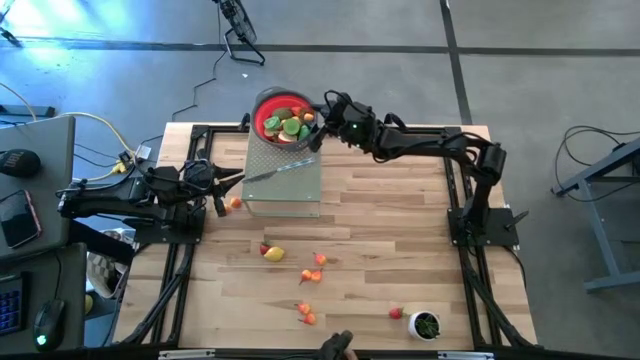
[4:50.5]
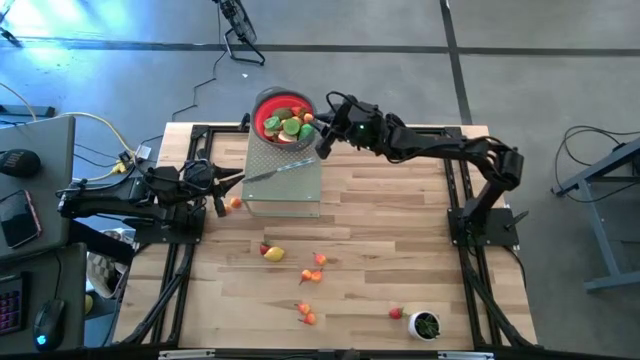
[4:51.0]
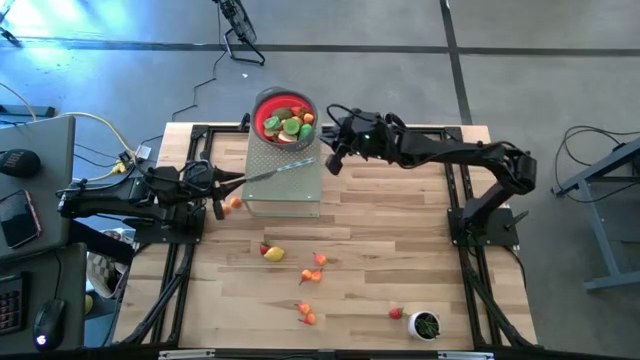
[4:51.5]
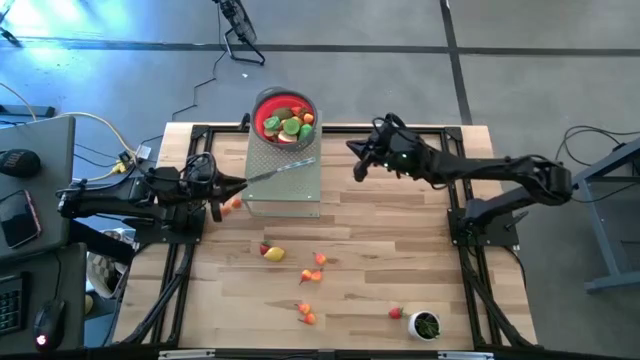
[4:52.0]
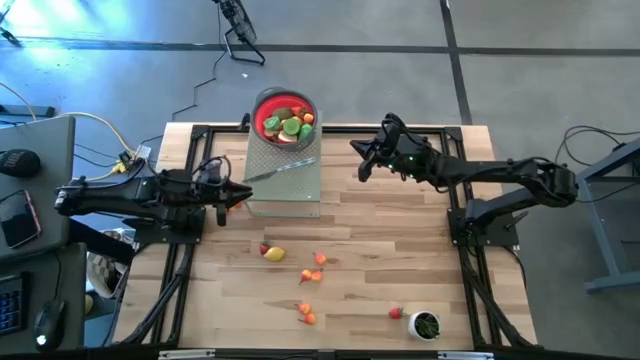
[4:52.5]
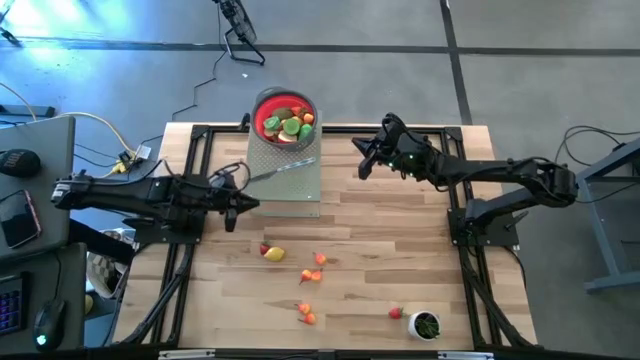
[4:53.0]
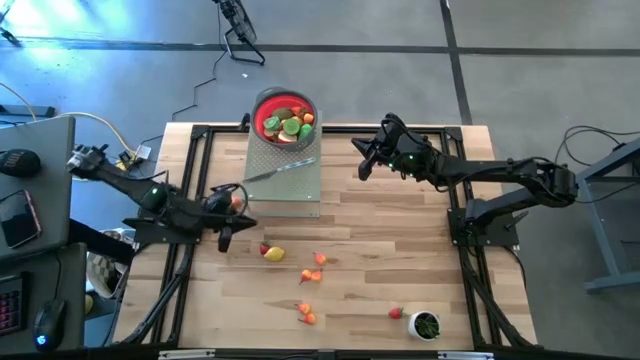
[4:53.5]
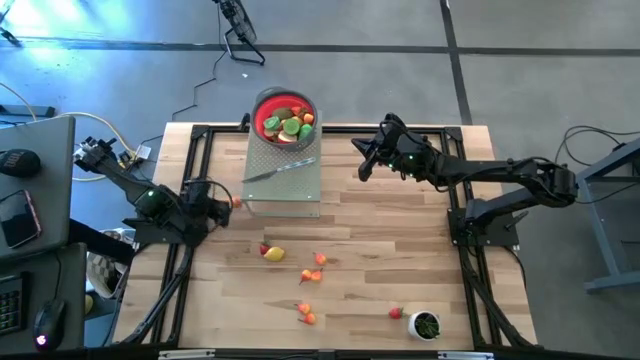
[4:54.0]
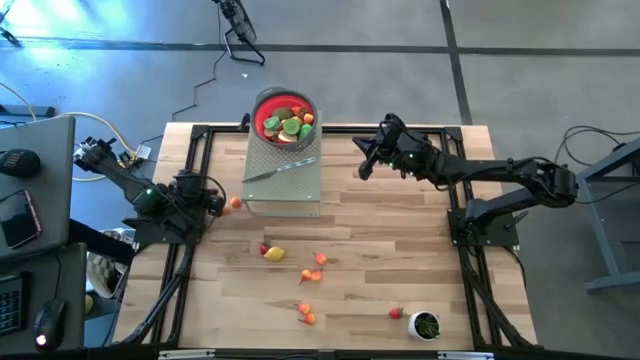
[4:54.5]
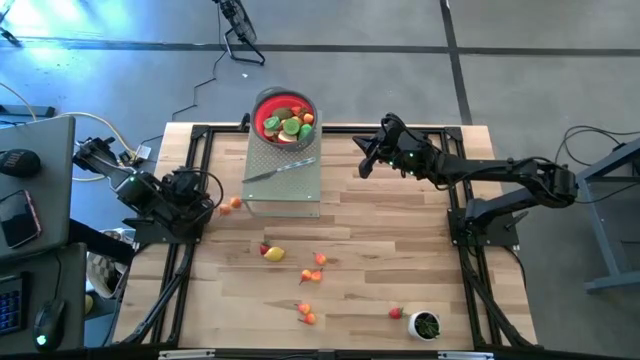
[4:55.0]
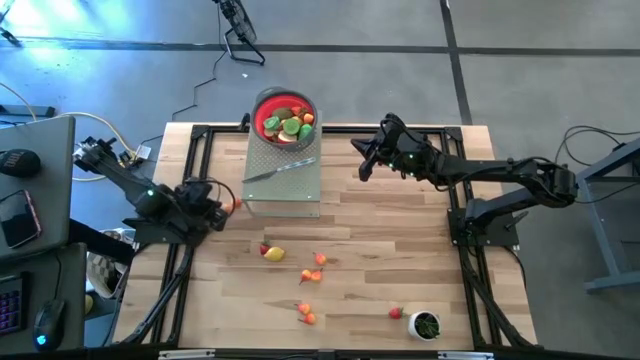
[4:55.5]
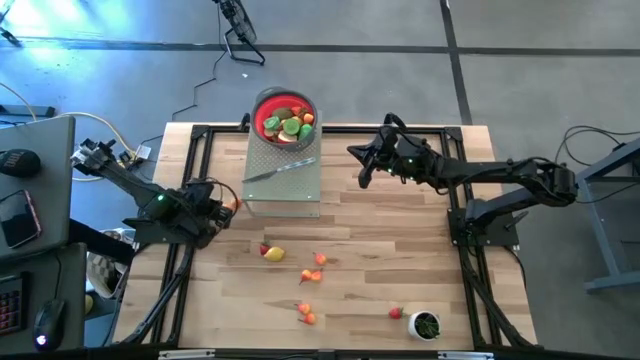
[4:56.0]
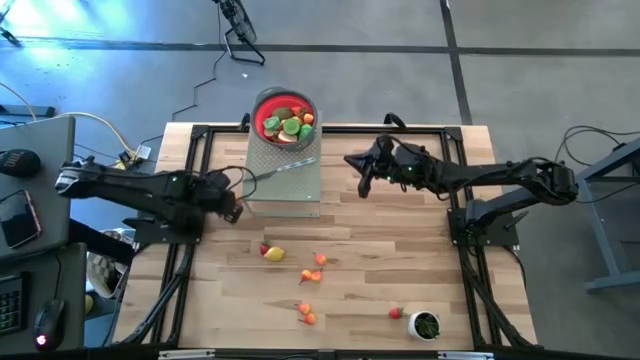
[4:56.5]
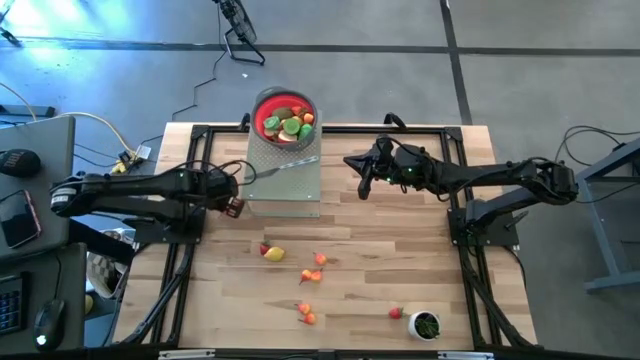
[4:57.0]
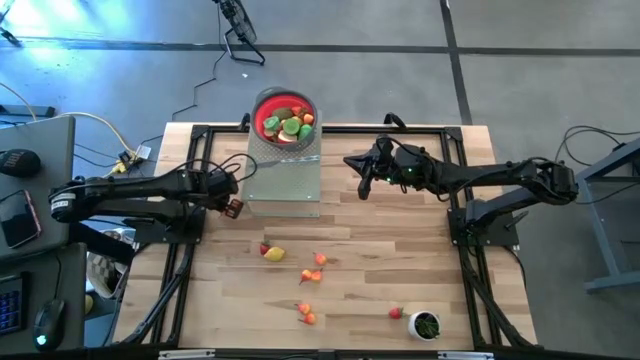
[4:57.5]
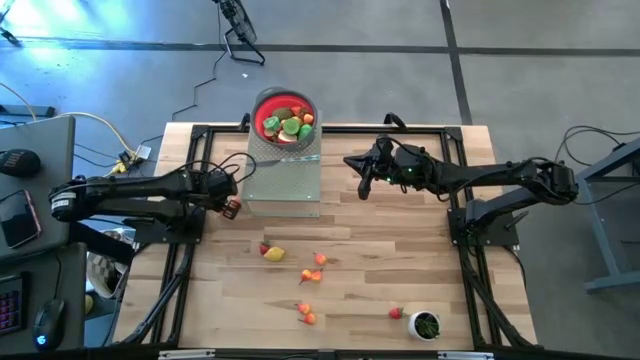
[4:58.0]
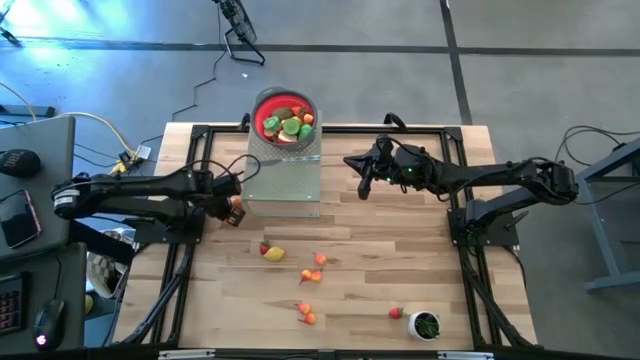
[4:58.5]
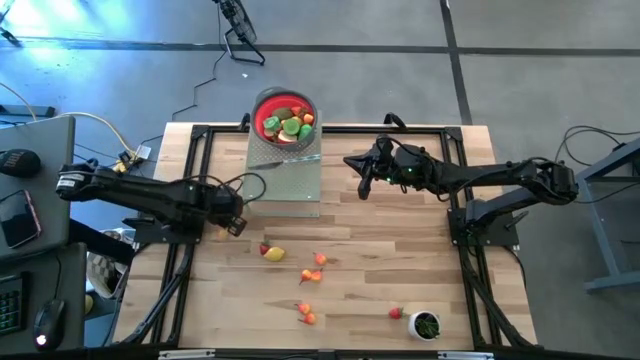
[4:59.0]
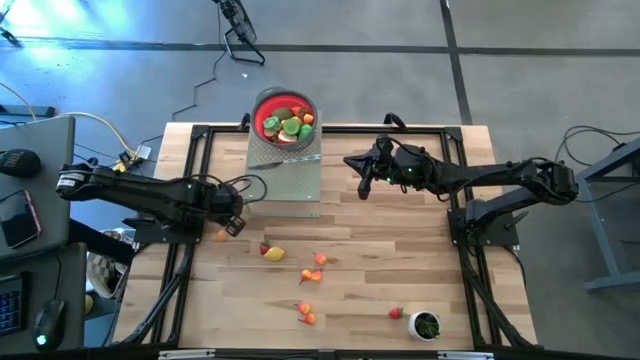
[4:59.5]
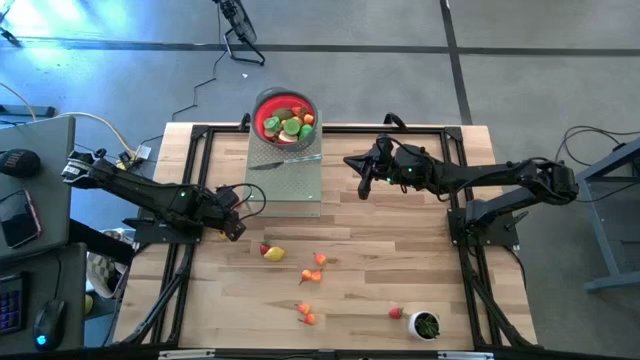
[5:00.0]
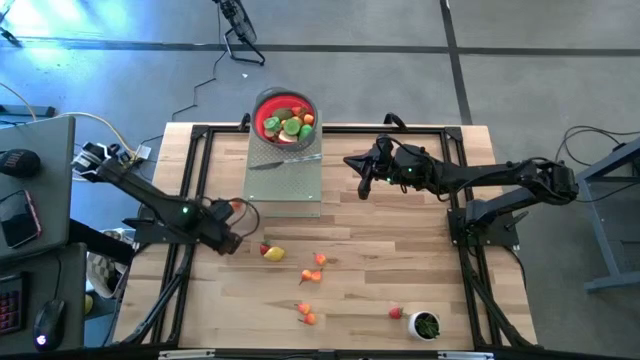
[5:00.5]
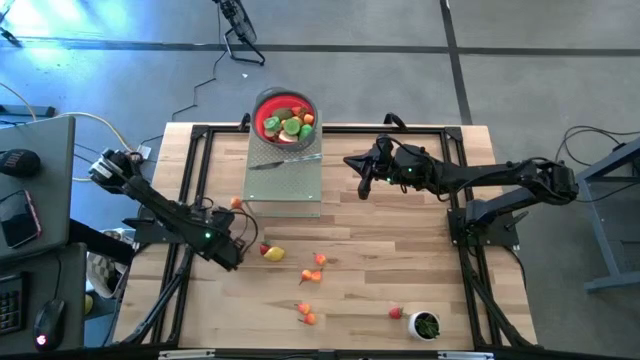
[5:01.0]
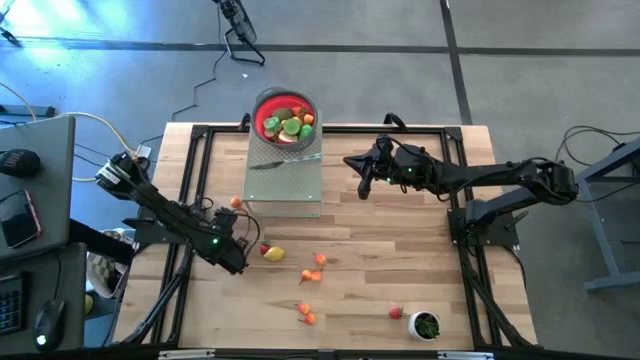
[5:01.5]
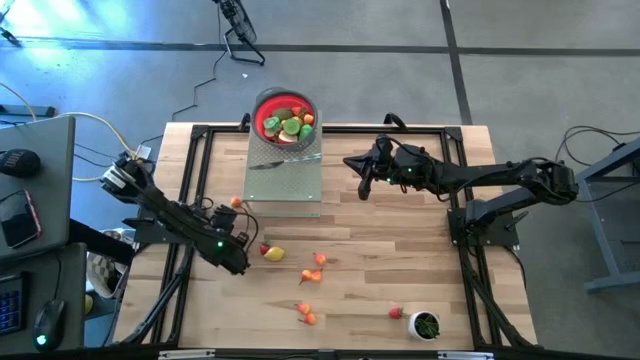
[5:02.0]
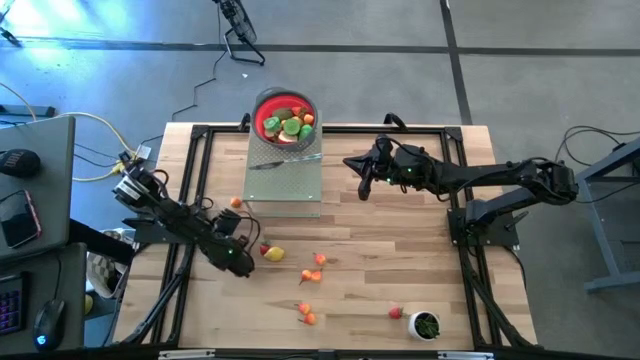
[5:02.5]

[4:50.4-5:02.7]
Task: Pick & Place Fruit
Put the orange pear into the red strainer on the shelf

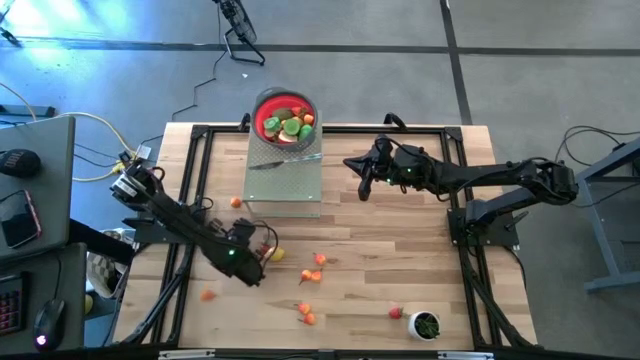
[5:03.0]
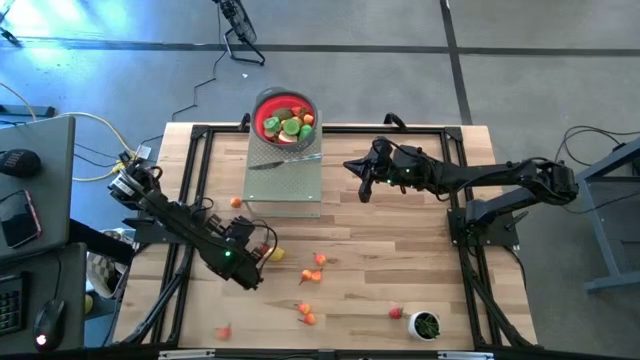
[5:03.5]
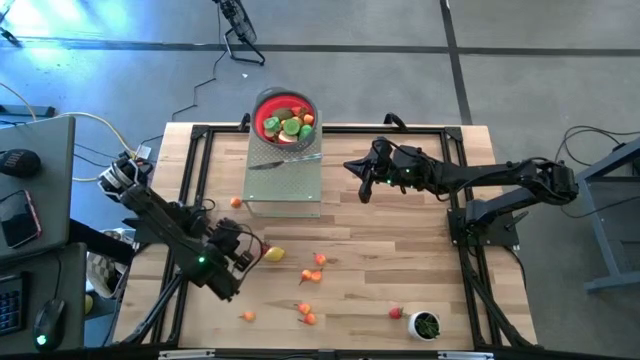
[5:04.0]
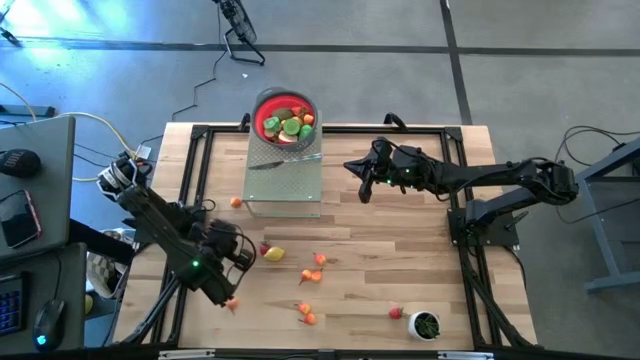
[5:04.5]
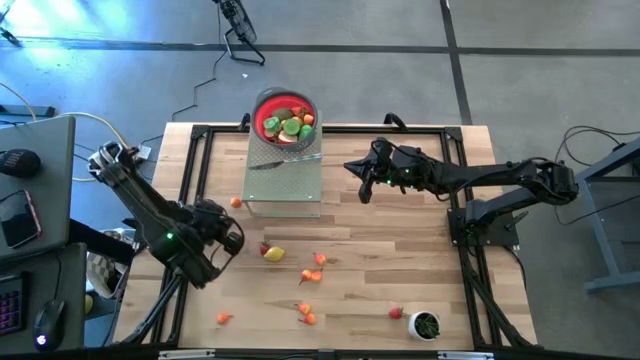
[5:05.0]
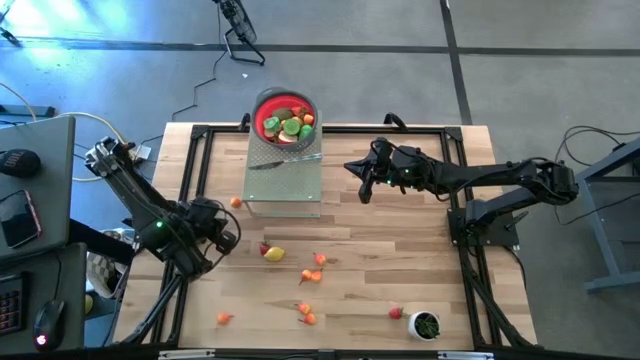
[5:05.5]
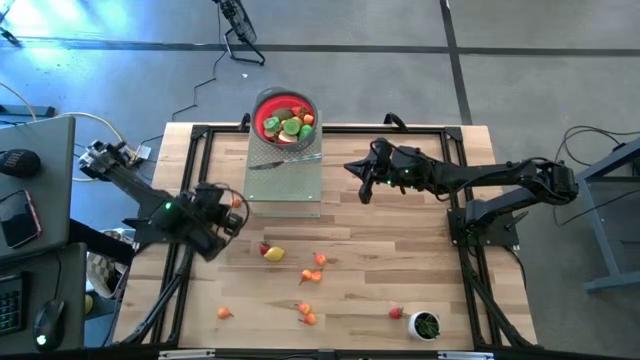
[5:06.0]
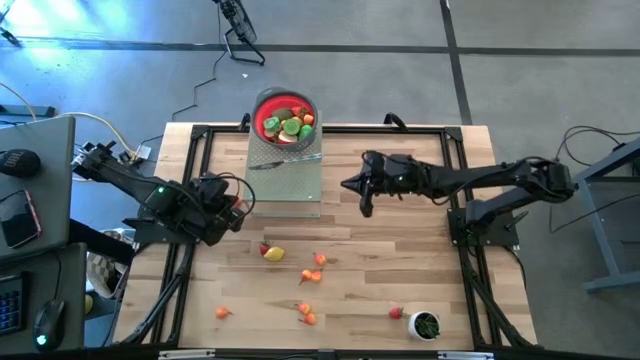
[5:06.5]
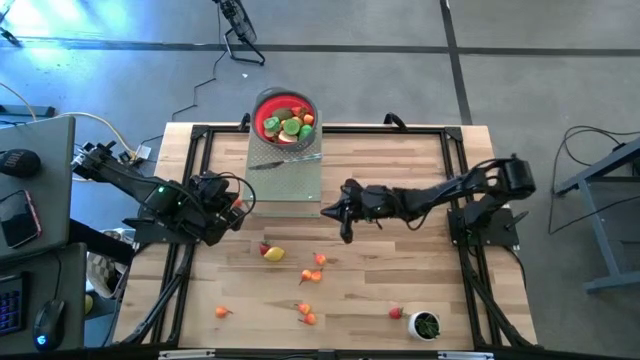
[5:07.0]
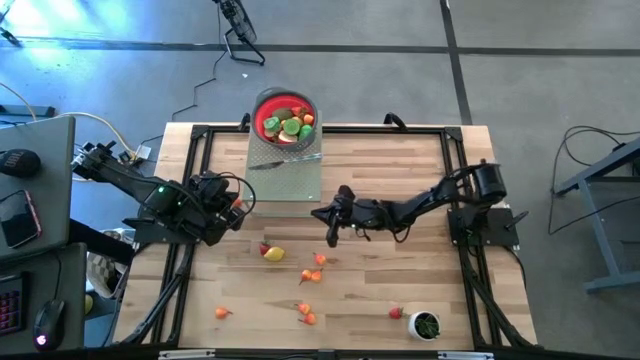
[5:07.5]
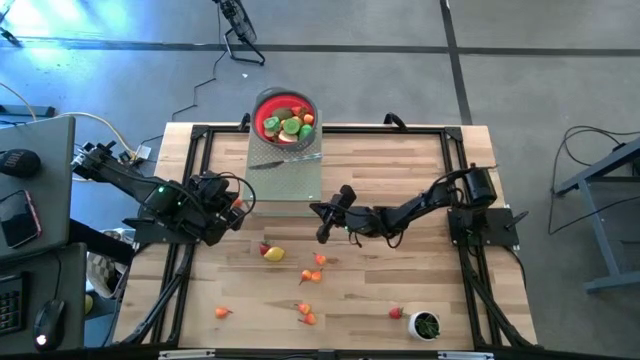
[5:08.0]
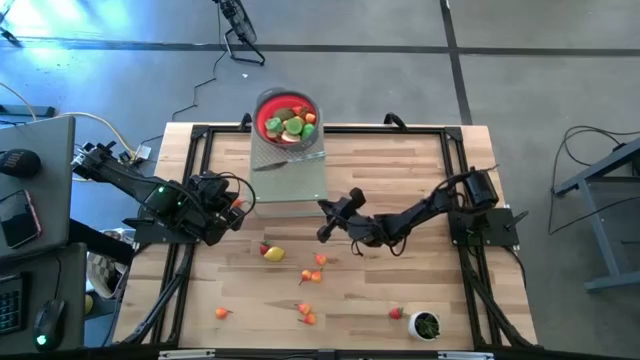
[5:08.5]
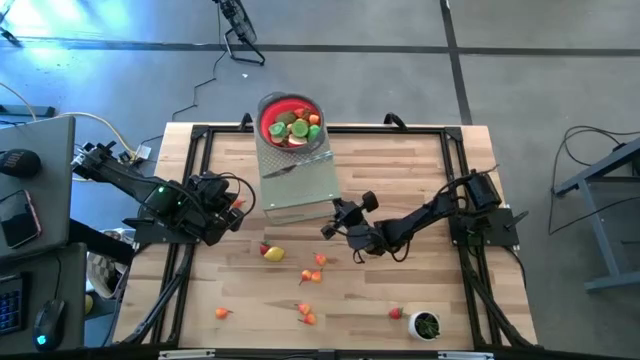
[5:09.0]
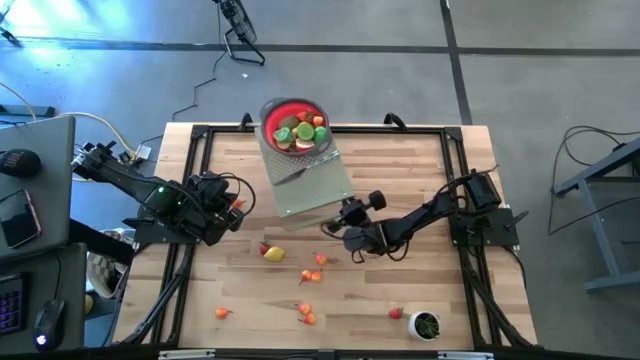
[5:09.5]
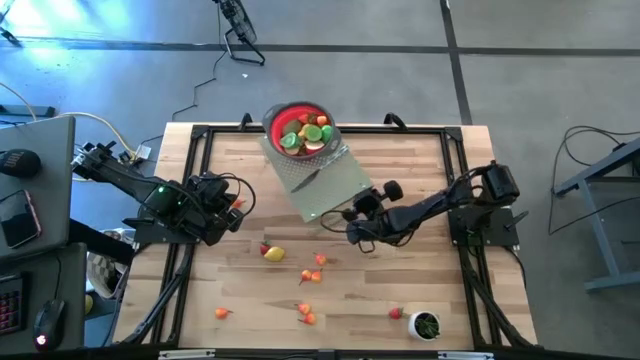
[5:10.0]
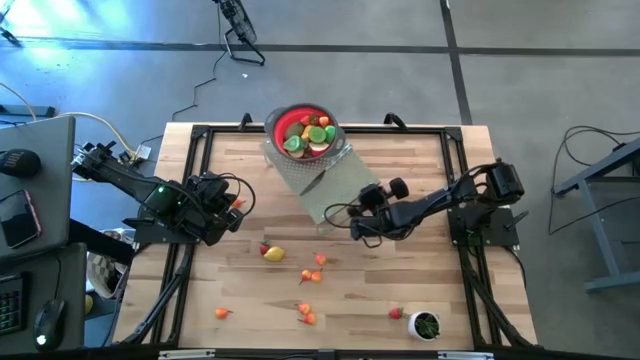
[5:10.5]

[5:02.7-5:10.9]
Adjust the shelf on the table
